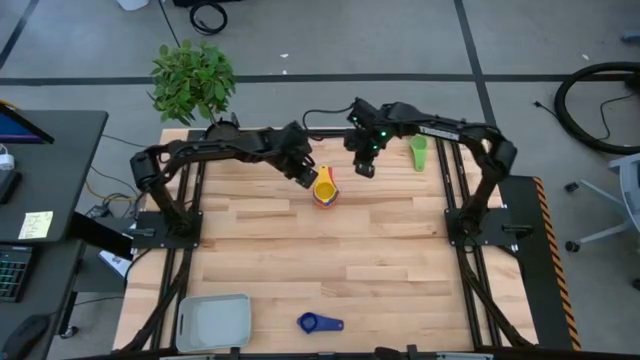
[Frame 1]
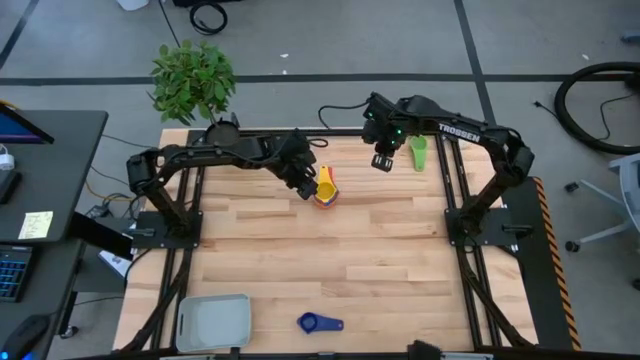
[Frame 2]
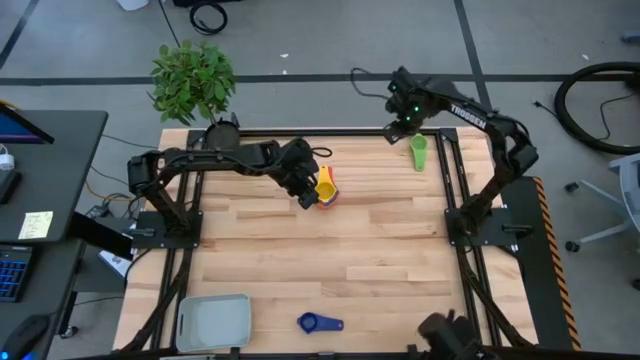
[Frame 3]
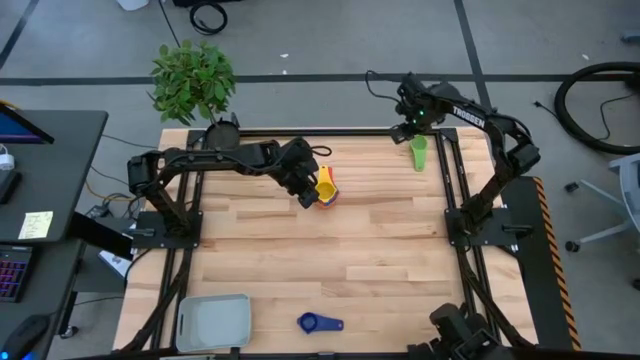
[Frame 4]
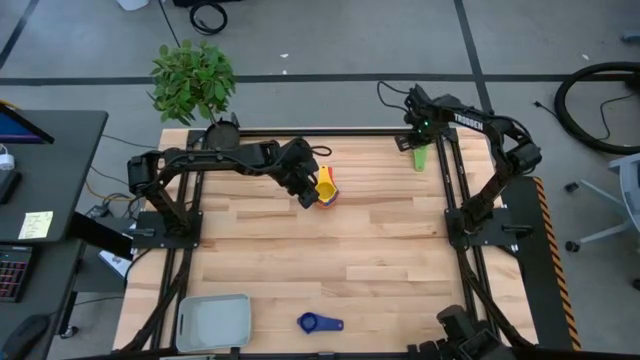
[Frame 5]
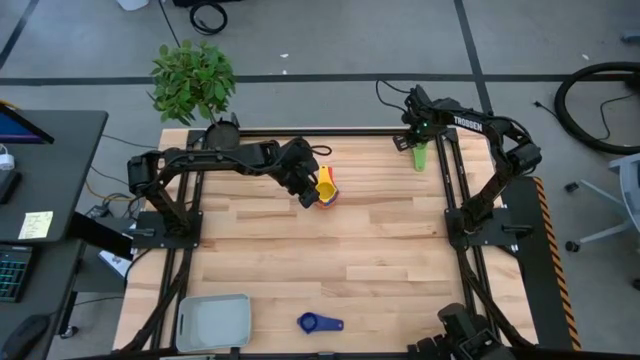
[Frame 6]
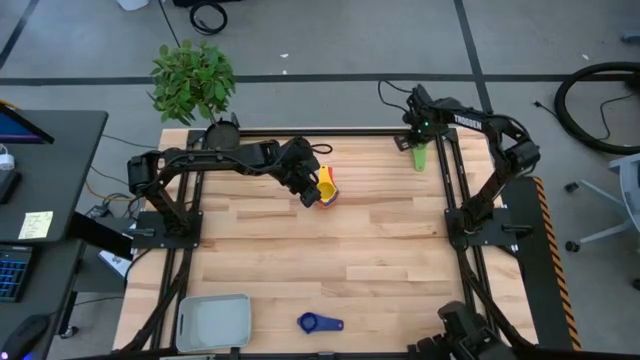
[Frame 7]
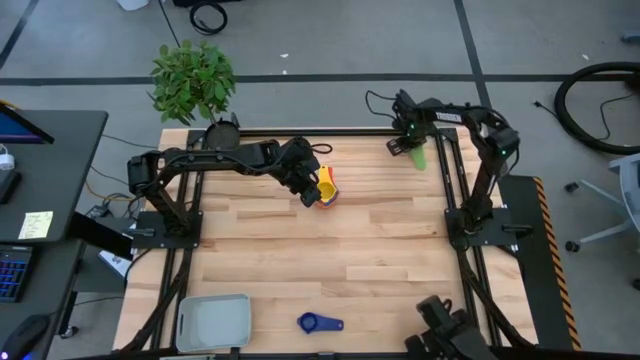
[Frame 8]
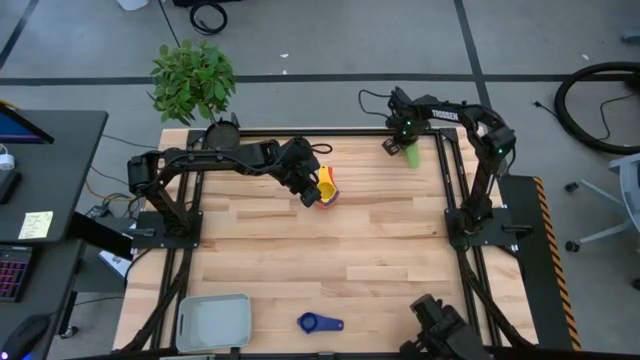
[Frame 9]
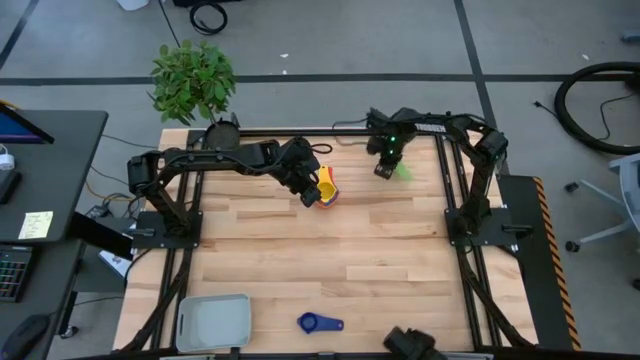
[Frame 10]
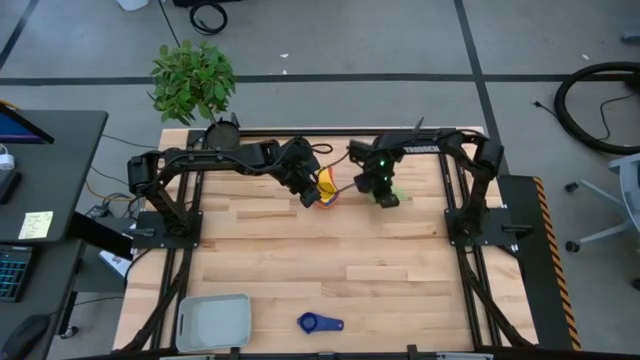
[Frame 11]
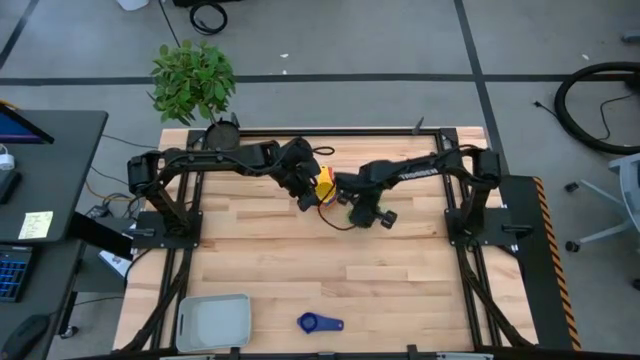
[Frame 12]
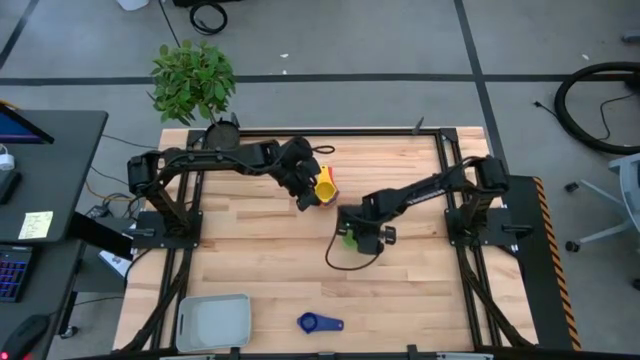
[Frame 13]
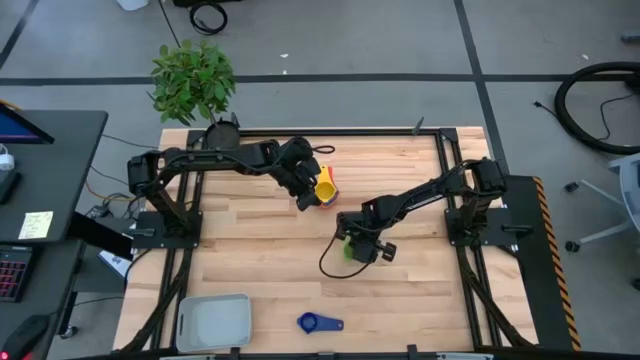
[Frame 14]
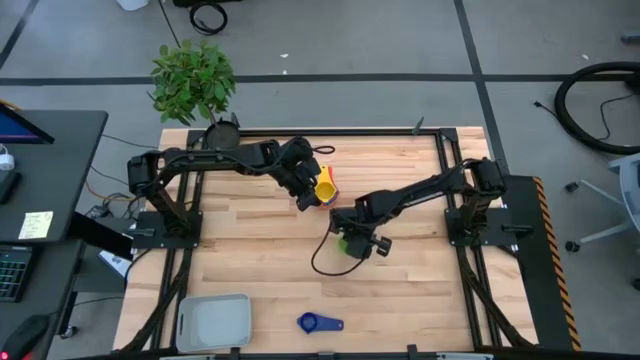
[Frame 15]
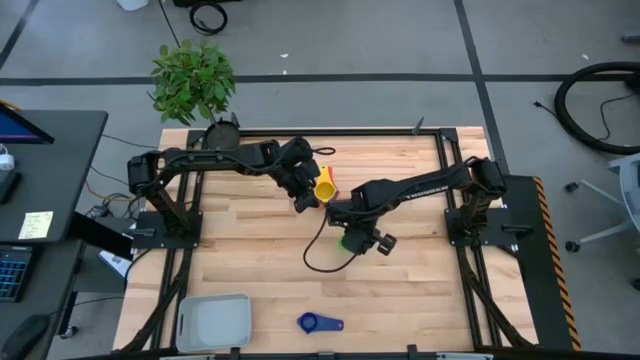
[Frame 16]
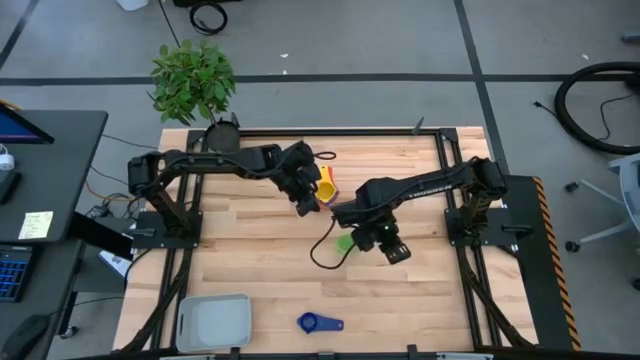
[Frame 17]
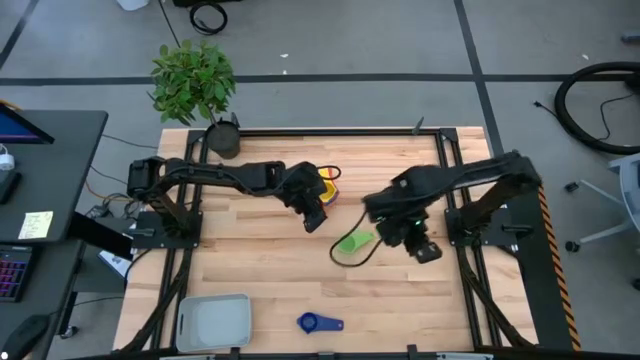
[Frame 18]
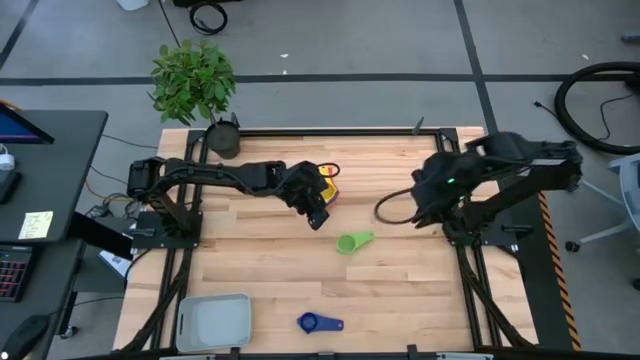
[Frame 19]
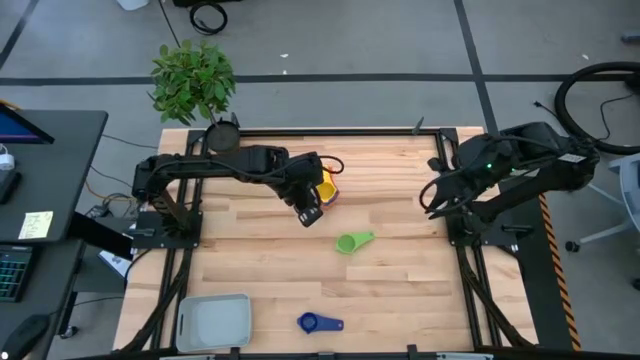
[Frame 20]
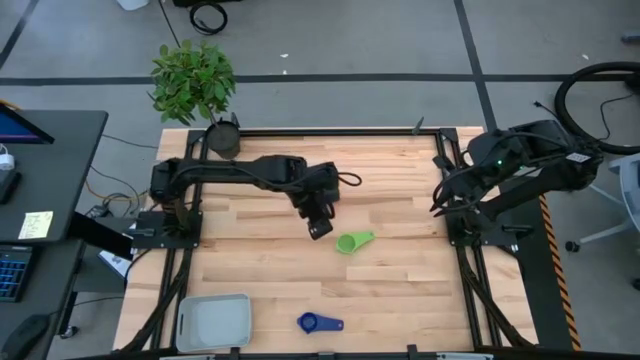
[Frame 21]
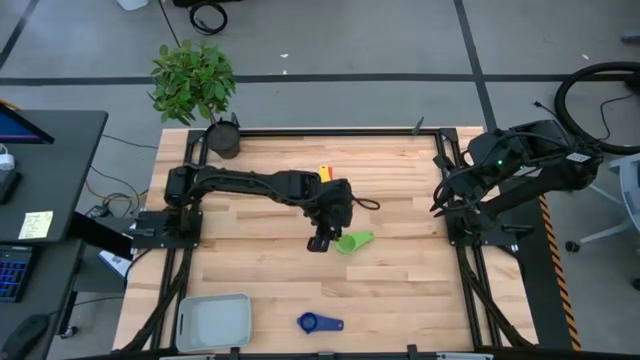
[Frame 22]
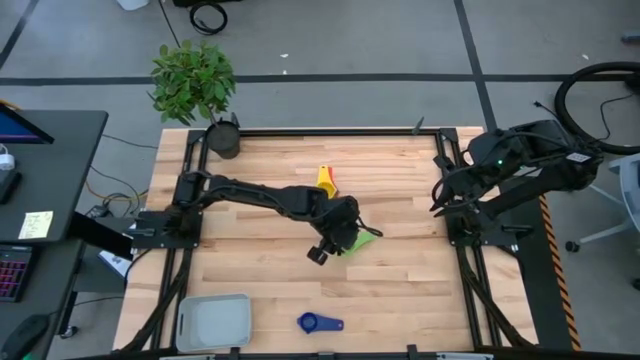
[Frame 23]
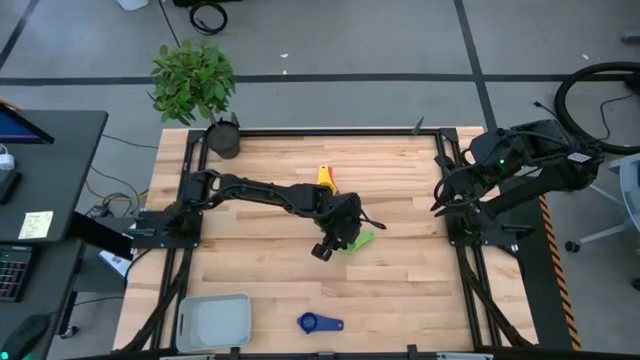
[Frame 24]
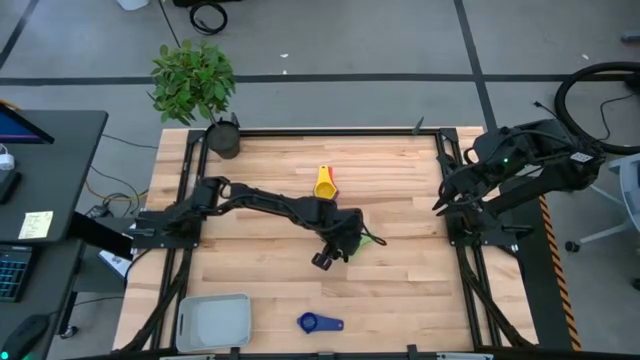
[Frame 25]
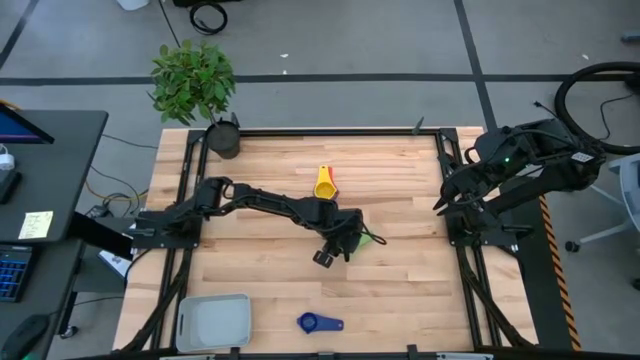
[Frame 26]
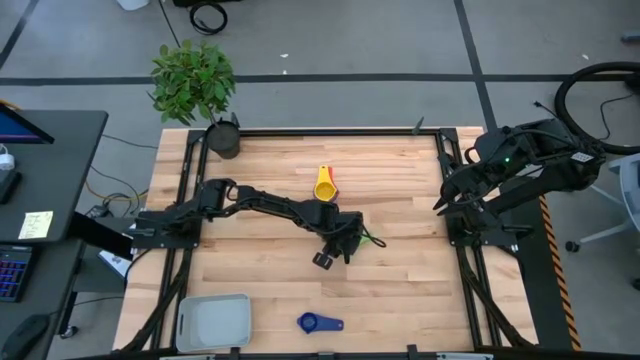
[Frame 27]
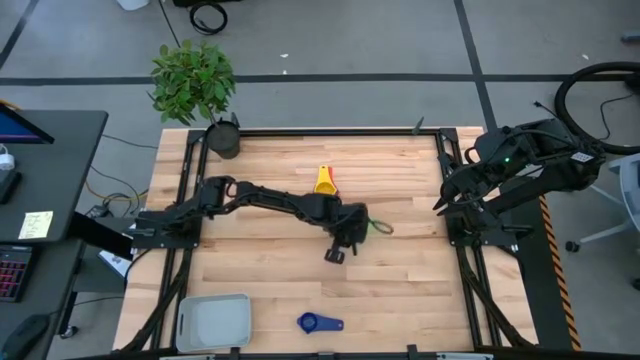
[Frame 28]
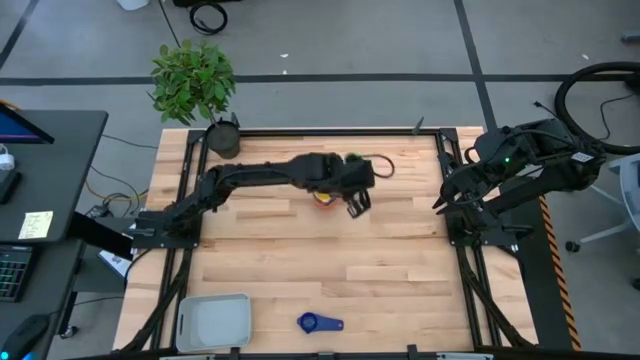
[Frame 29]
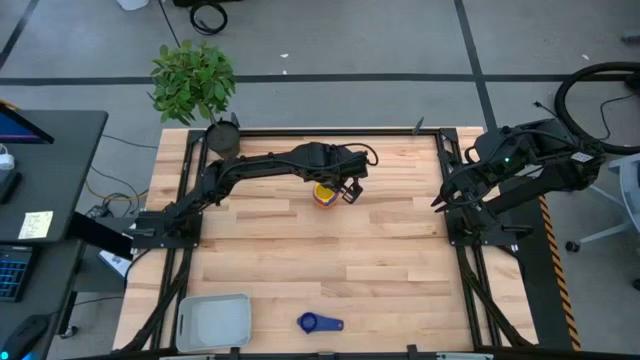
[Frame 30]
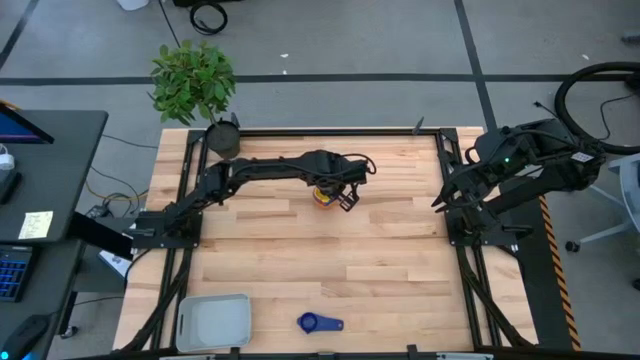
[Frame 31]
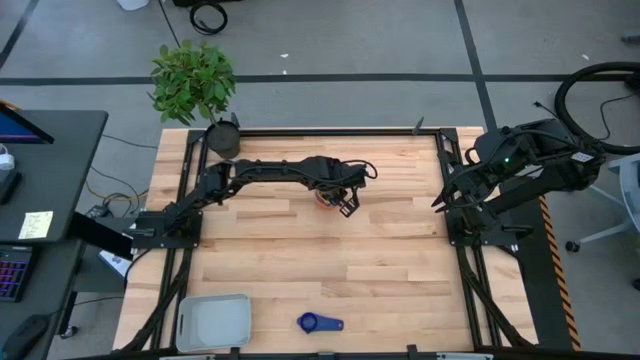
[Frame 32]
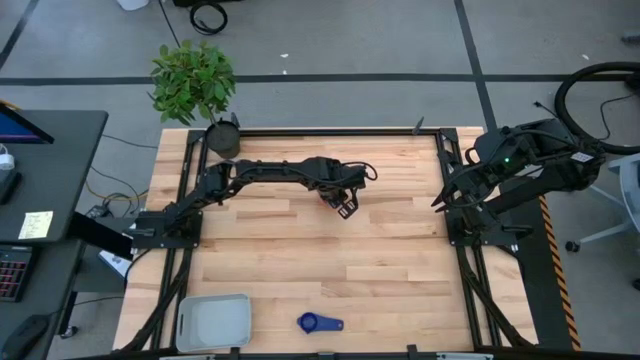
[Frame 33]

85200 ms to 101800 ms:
Task: Nest measuring cups in basket
Stack the green measuring cup on top of the yellow measuring cup

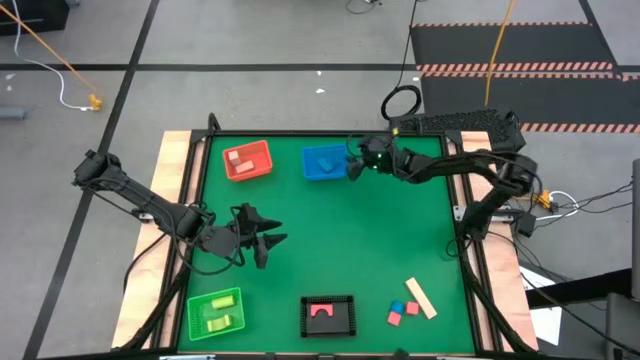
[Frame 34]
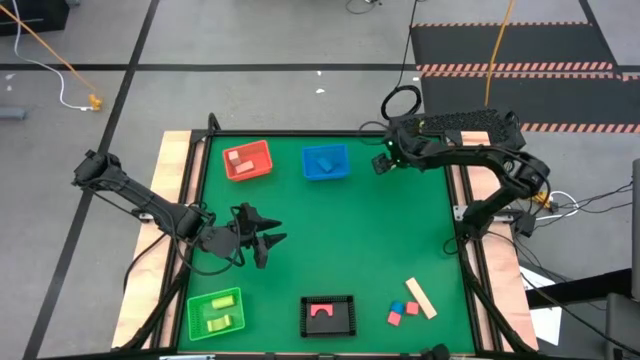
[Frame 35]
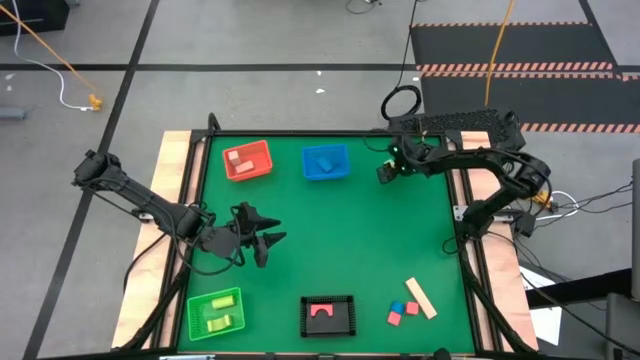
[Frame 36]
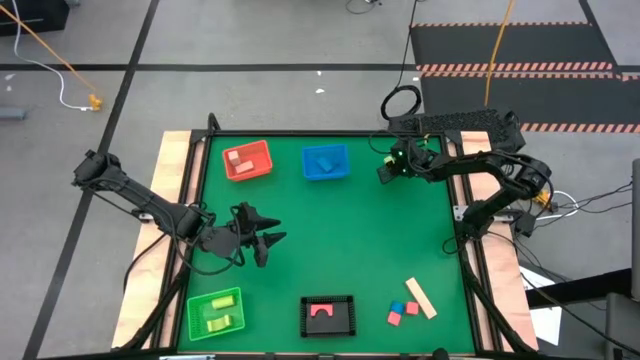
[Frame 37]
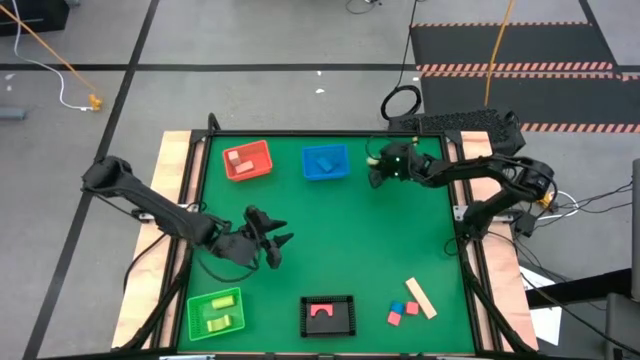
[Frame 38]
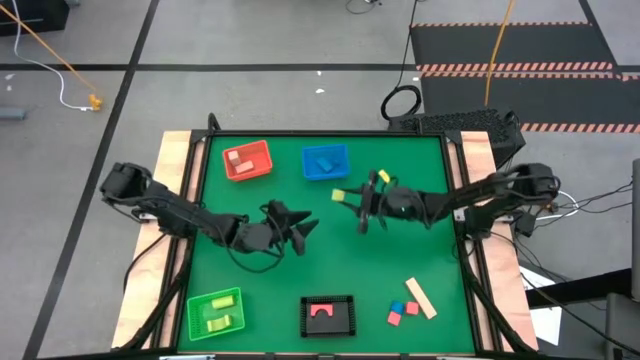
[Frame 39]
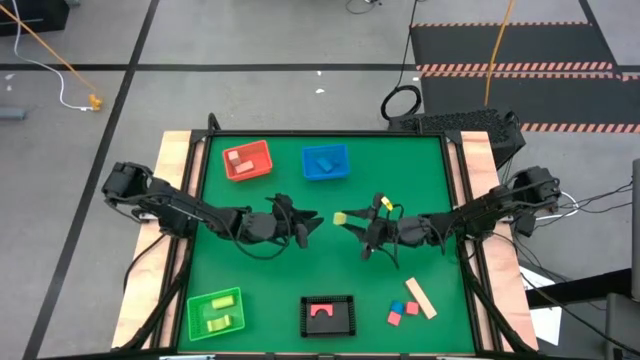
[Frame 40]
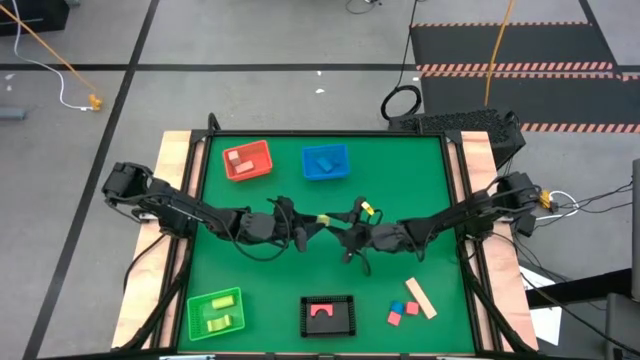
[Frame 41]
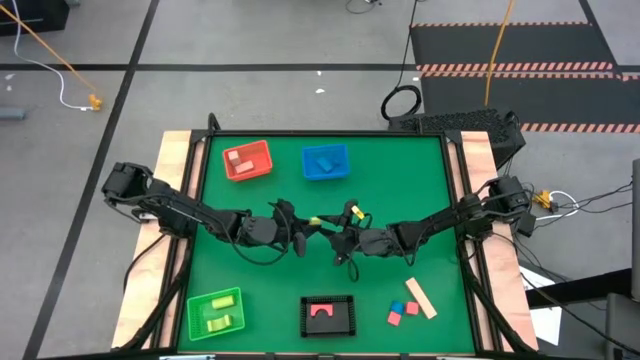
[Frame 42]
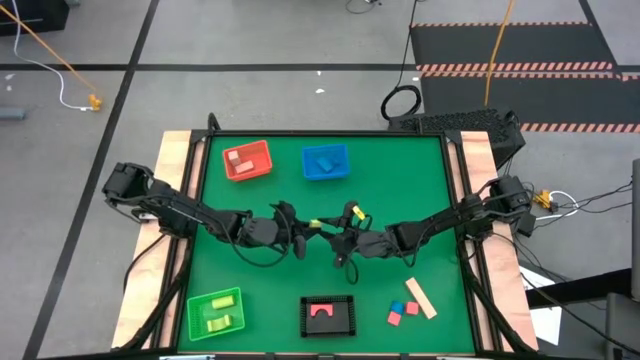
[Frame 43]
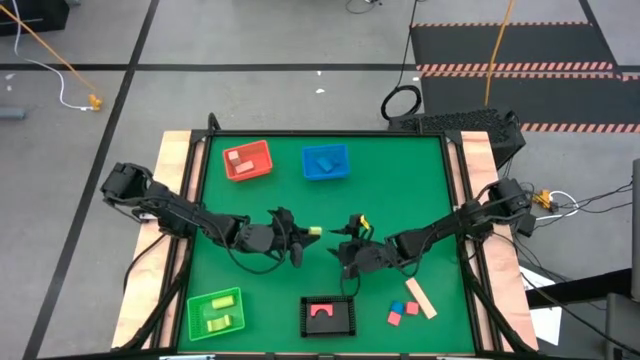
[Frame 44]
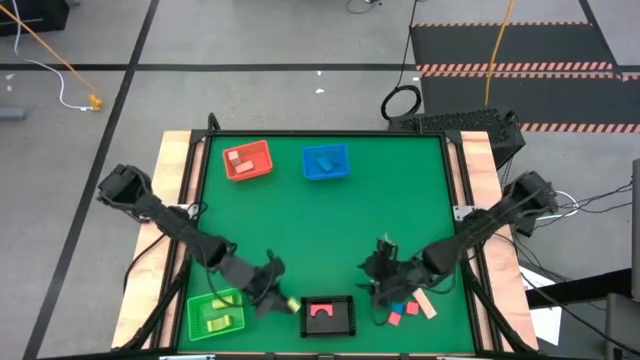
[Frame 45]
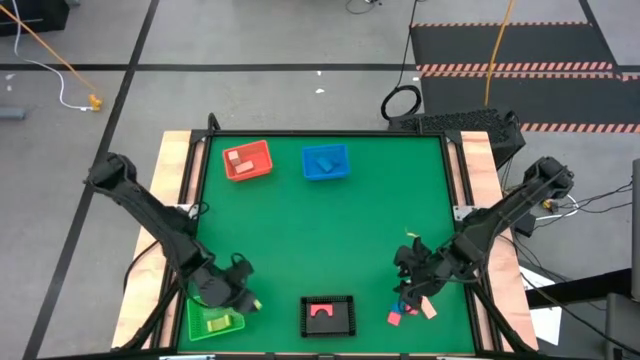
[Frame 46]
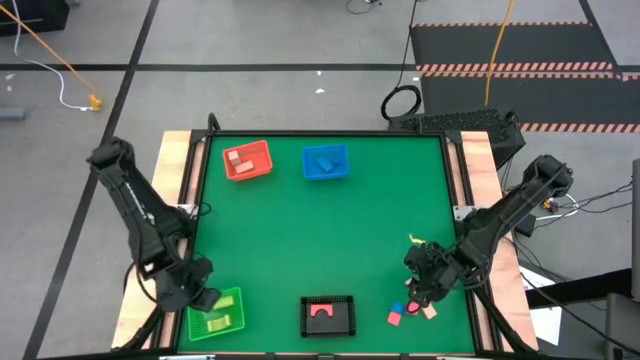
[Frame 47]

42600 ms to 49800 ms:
Task: Sort & place blocks by color
Put the green block into the green bin
